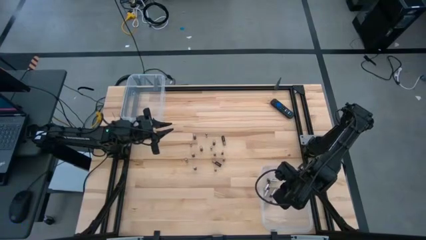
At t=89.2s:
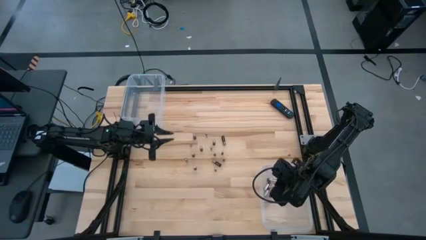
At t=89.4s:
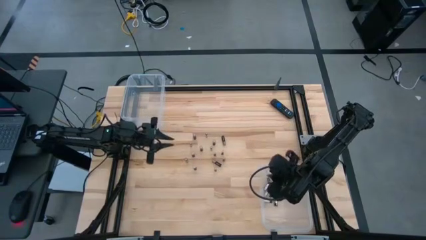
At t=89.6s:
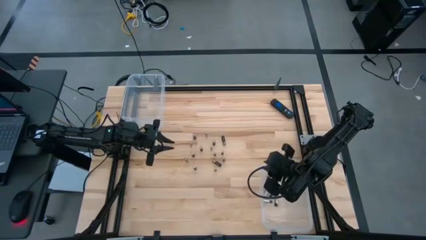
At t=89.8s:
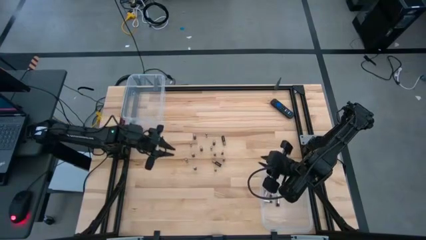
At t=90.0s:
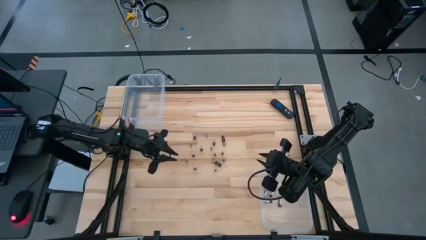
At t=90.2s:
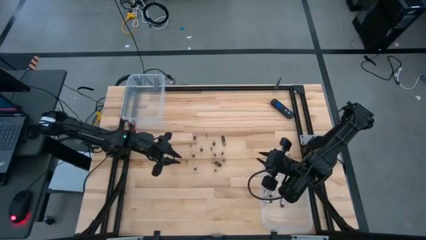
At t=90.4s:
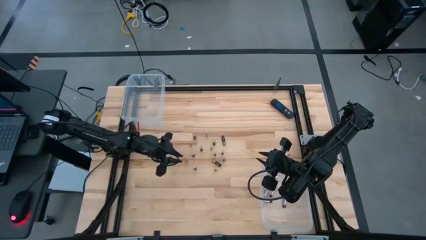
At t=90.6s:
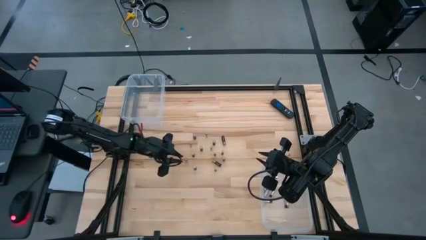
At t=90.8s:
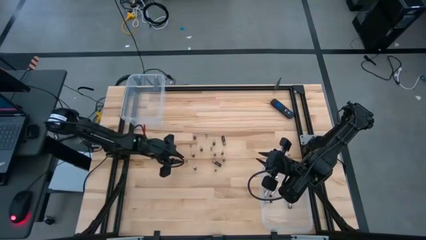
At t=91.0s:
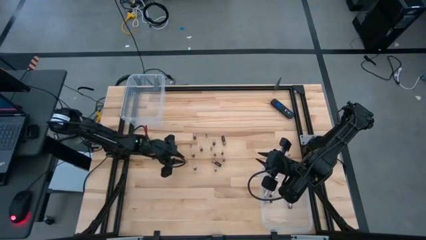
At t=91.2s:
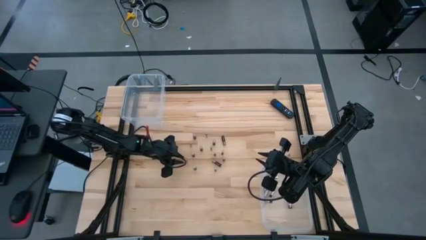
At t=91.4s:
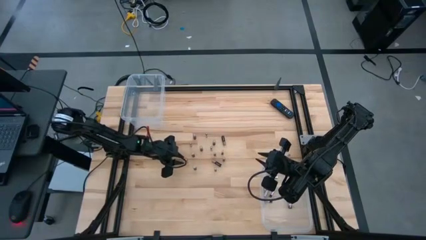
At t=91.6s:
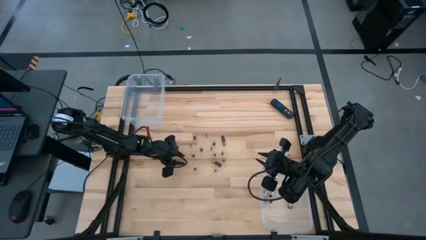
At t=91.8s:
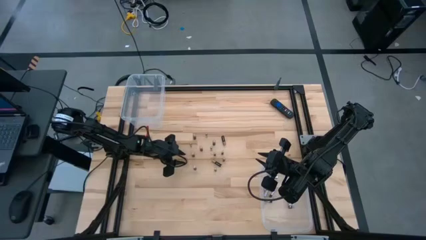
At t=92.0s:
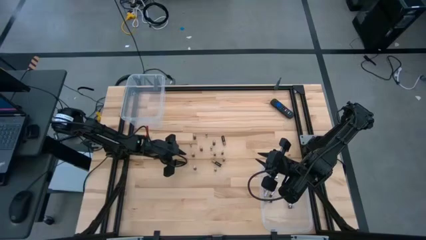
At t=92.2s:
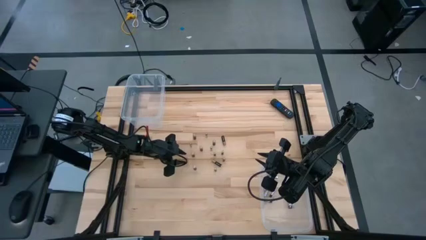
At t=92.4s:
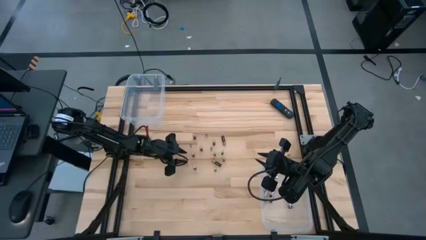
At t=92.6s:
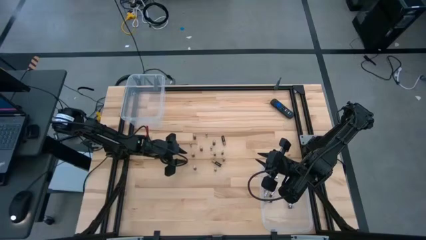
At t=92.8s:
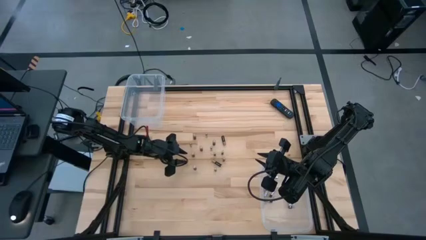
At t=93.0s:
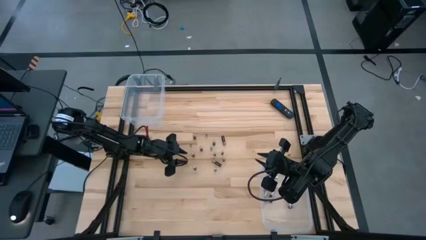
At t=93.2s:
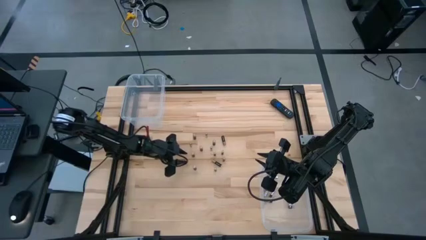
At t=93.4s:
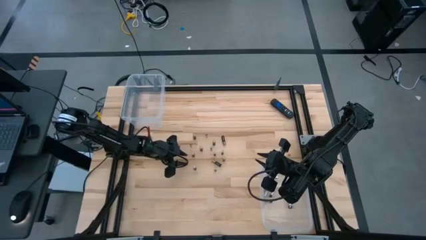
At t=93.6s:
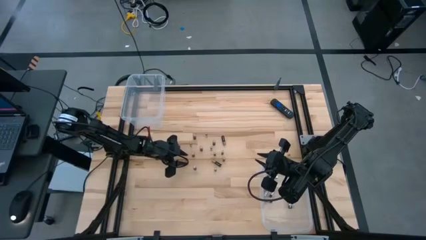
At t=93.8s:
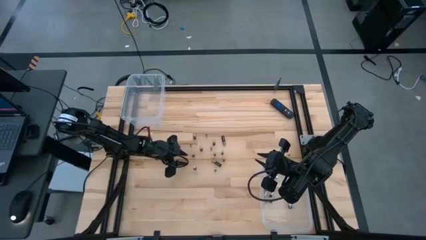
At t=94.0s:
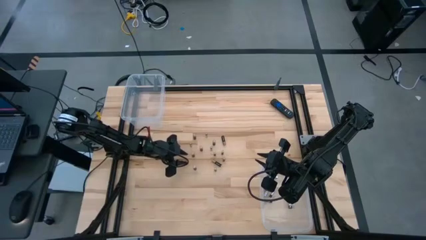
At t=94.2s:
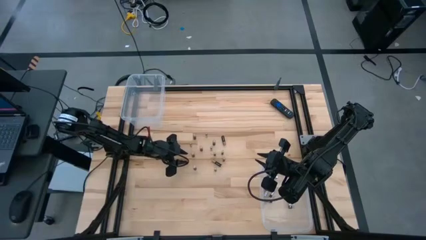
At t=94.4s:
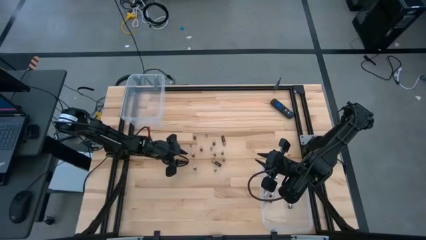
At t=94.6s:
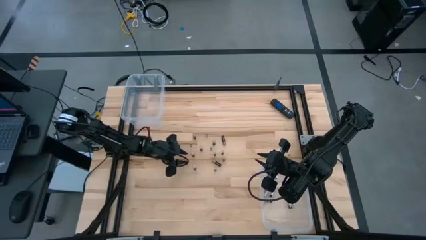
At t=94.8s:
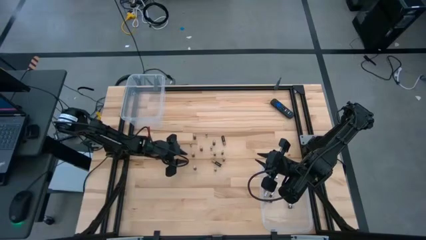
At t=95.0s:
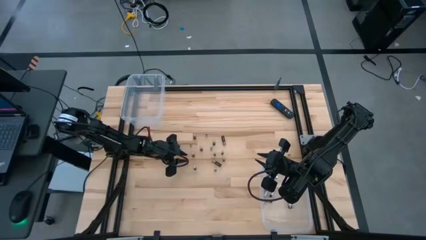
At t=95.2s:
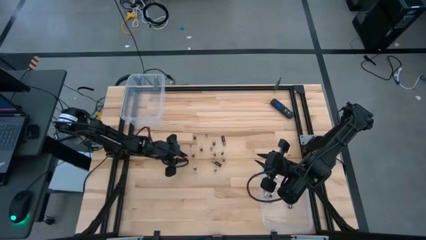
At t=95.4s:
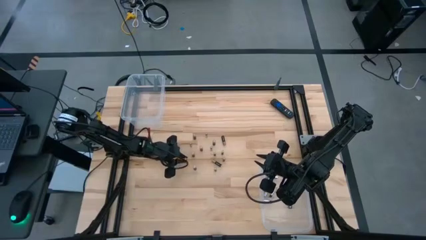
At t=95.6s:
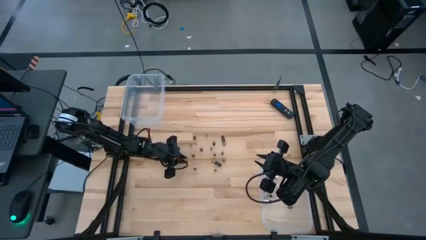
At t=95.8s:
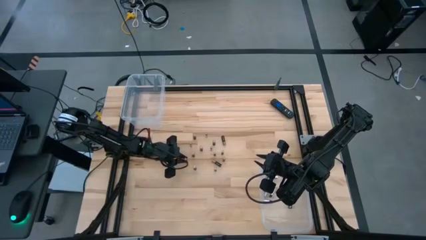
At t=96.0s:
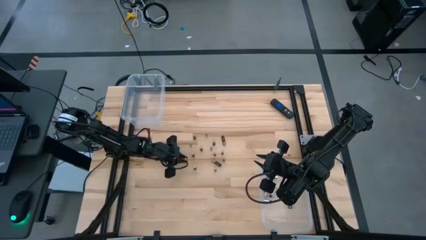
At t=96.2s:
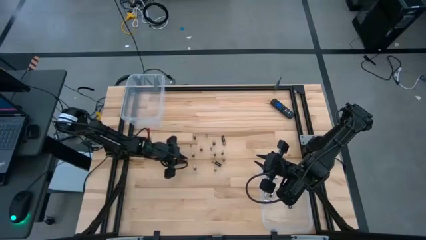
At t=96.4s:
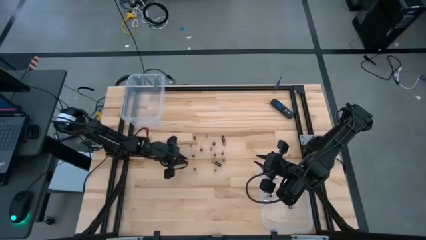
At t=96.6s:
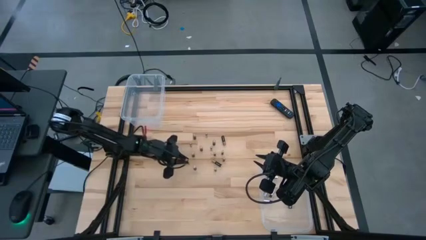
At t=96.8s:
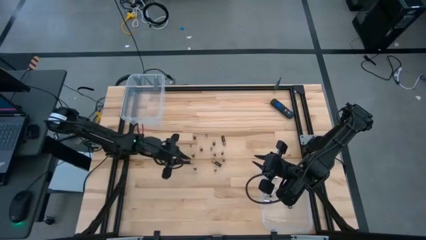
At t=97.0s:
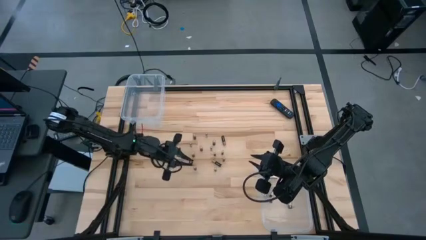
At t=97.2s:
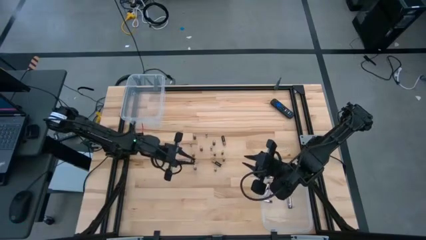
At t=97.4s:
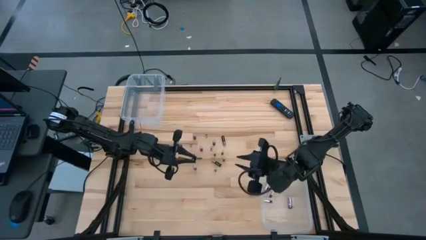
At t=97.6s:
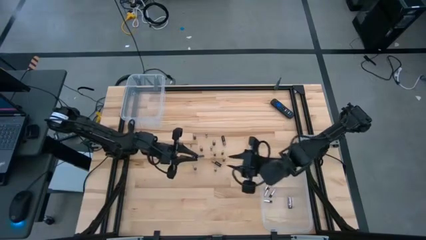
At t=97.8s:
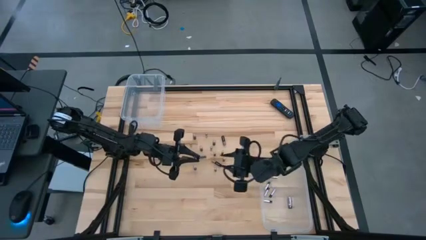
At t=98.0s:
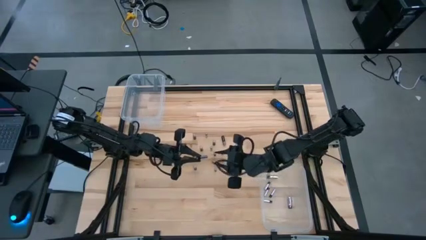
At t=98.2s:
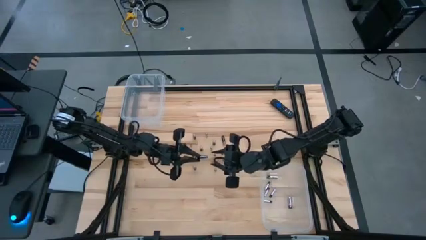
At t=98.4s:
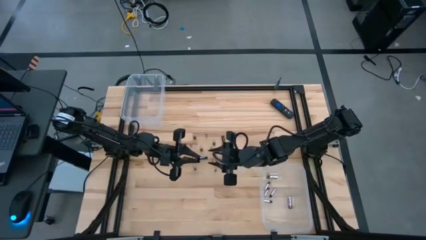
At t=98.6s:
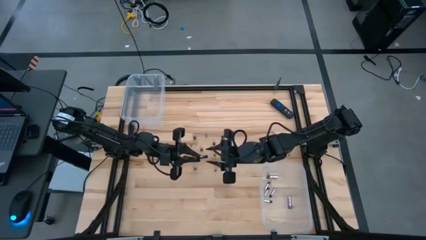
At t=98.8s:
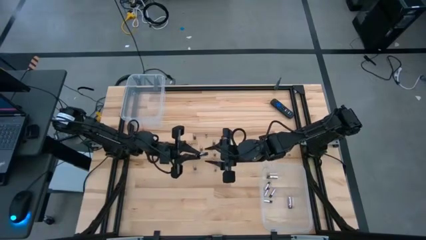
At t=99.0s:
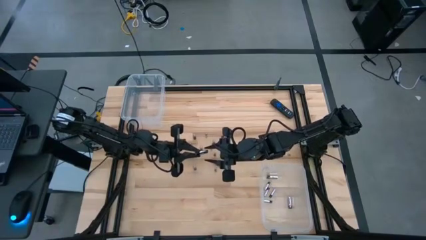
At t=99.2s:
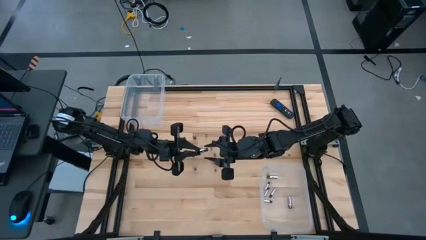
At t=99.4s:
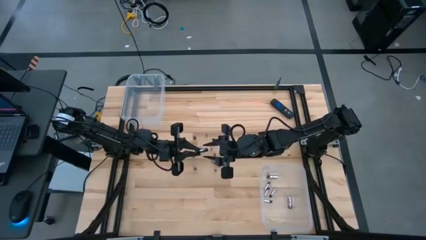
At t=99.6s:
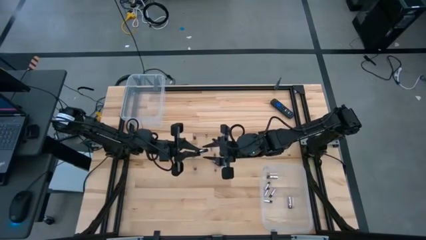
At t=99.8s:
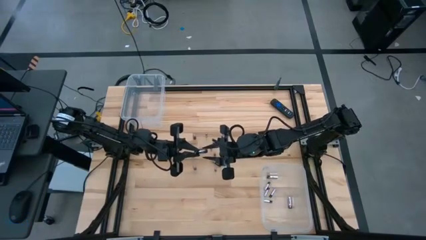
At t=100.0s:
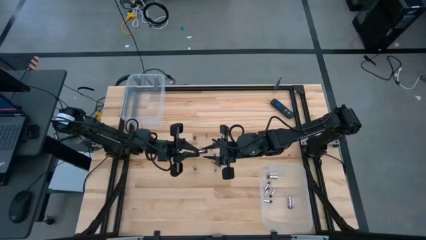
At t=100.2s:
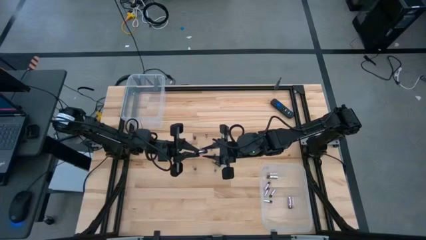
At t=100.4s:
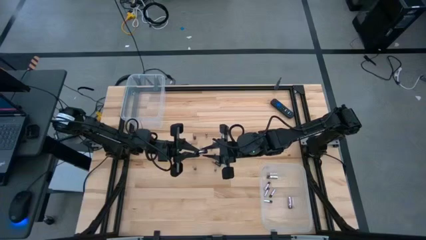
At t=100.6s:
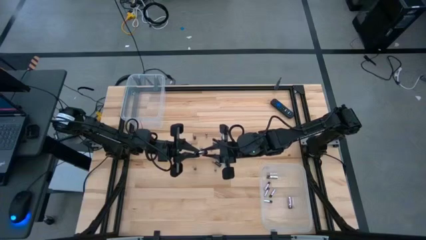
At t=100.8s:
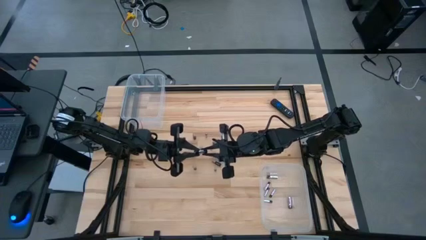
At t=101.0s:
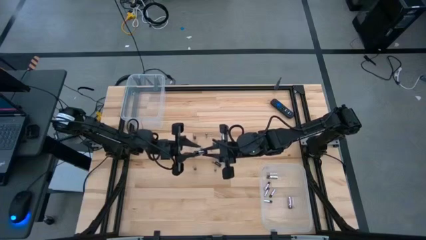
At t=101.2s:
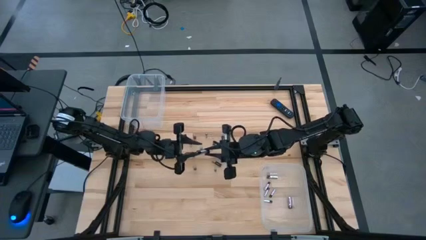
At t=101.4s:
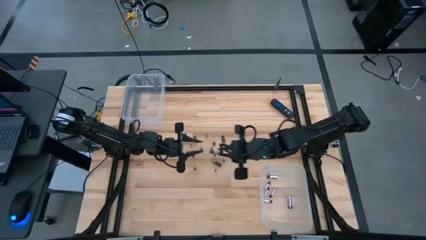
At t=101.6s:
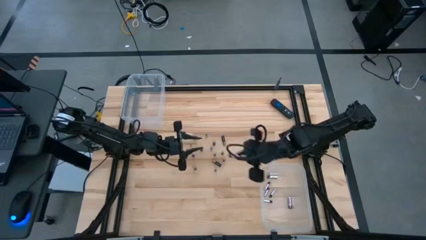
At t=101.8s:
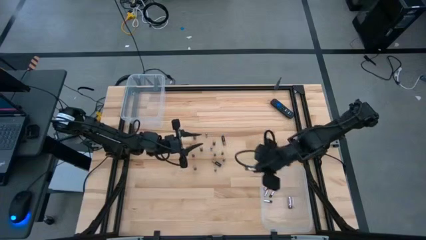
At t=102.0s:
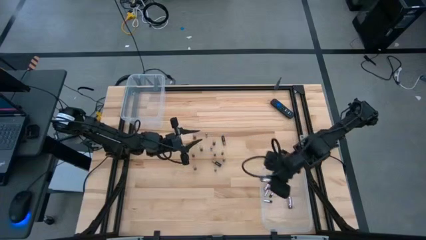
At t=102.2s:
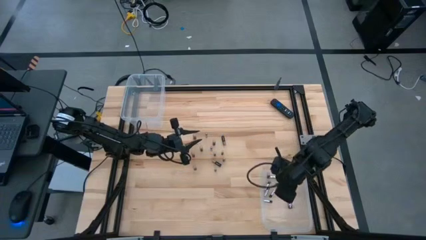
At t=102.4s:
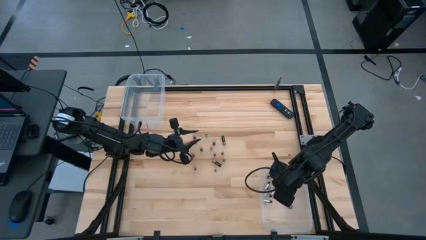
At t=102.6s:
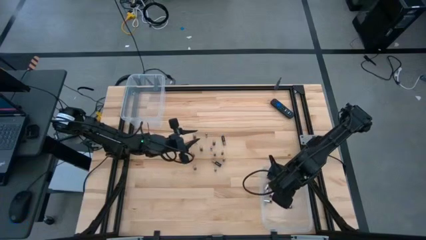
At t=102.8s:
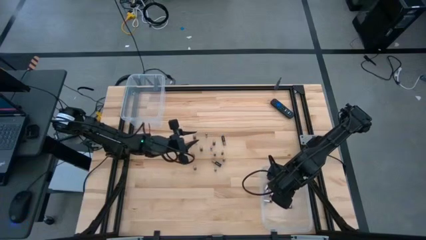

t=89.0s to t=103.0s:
Task: Sort batteries
Put the black and silver battery into the bottom transparent bin
